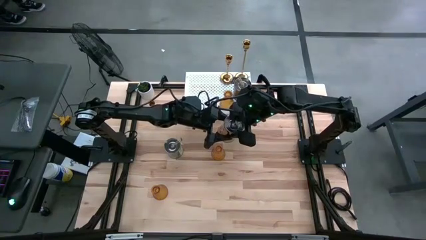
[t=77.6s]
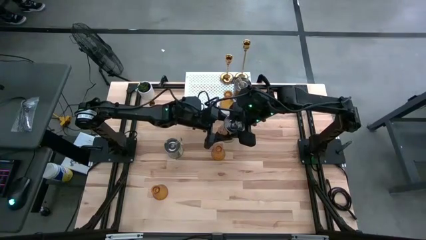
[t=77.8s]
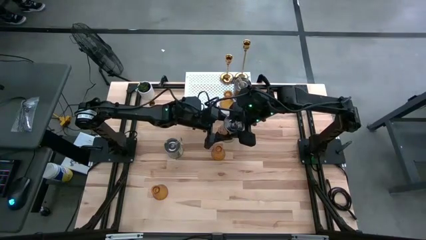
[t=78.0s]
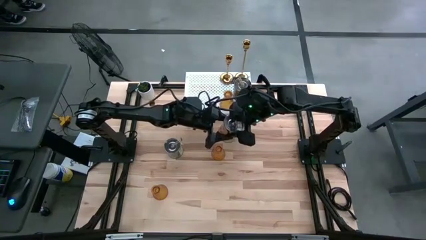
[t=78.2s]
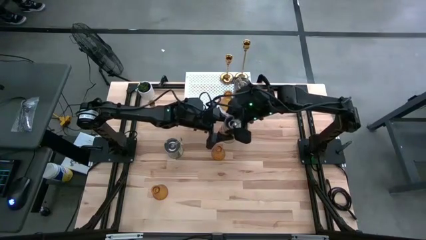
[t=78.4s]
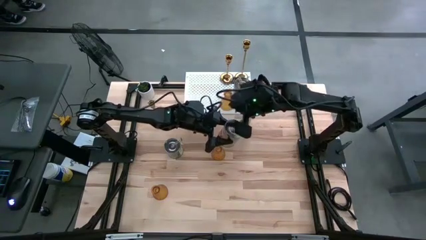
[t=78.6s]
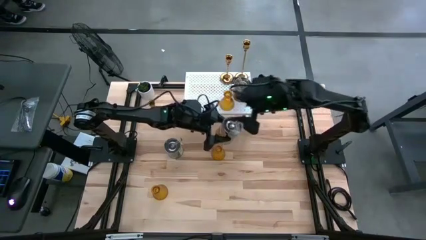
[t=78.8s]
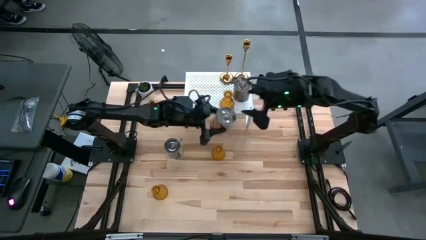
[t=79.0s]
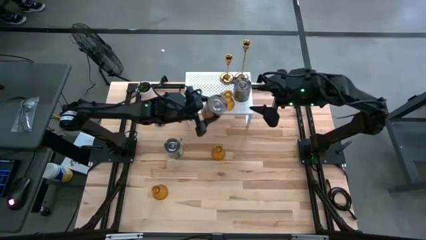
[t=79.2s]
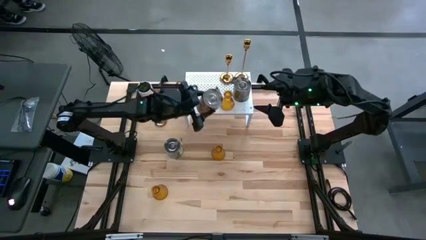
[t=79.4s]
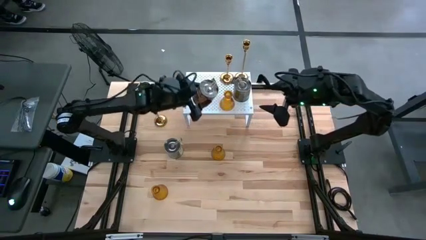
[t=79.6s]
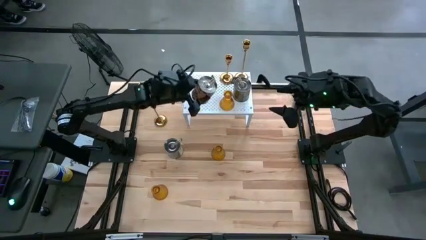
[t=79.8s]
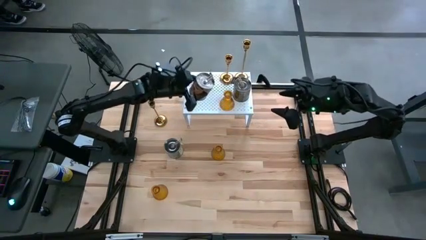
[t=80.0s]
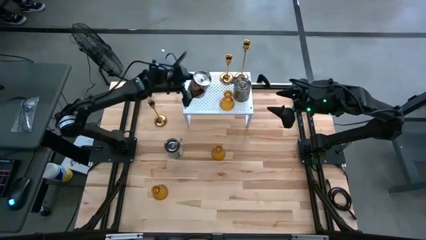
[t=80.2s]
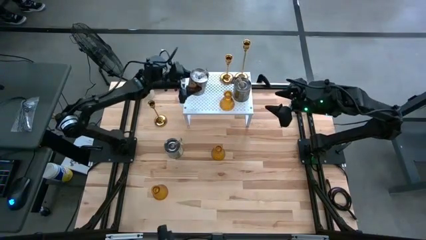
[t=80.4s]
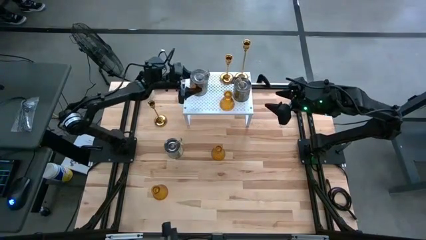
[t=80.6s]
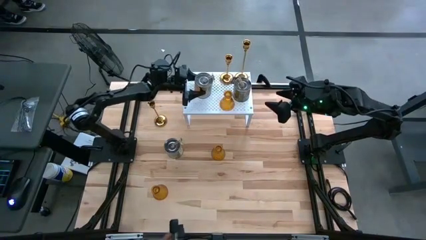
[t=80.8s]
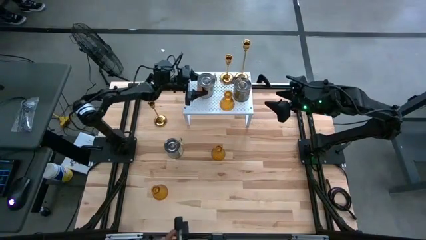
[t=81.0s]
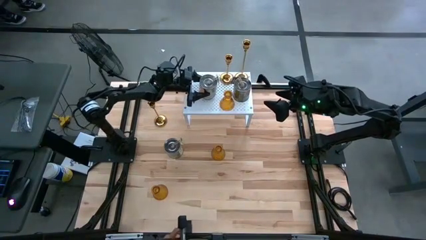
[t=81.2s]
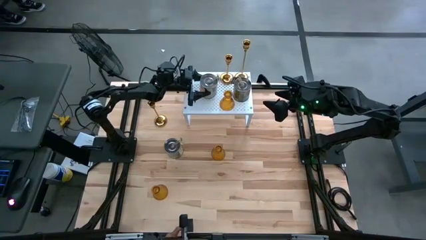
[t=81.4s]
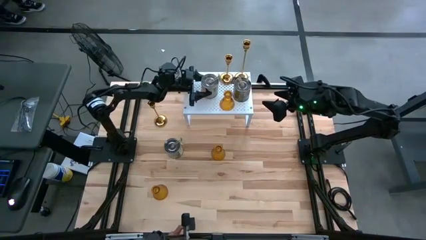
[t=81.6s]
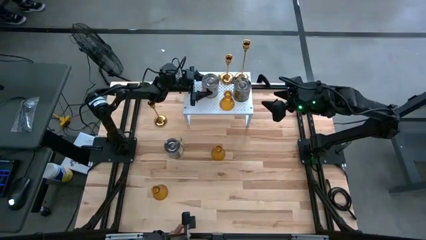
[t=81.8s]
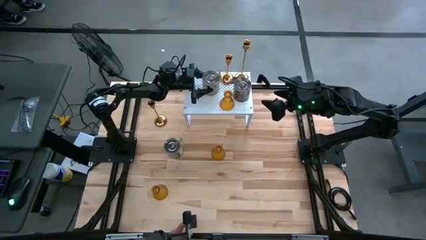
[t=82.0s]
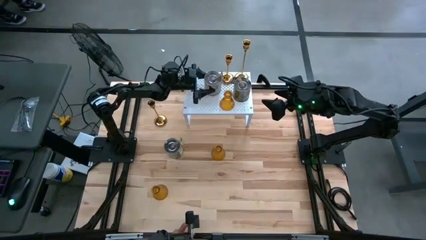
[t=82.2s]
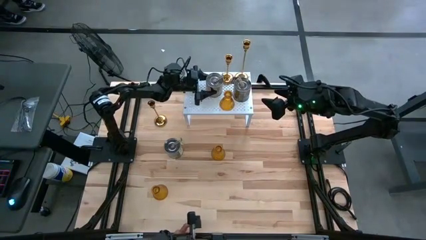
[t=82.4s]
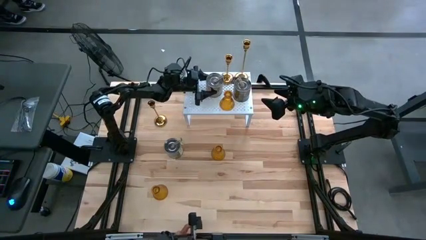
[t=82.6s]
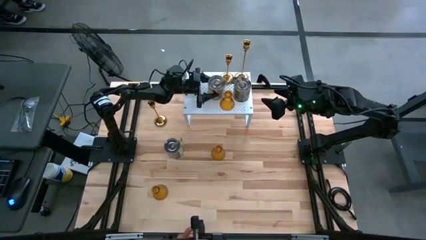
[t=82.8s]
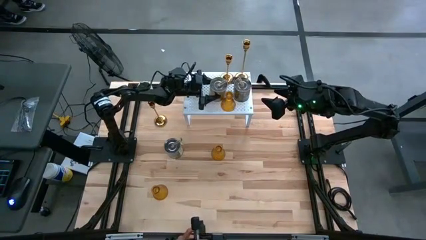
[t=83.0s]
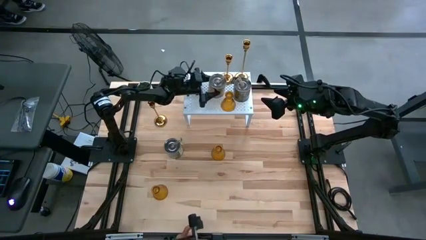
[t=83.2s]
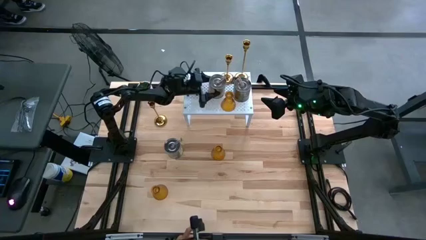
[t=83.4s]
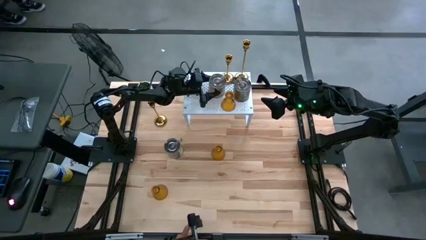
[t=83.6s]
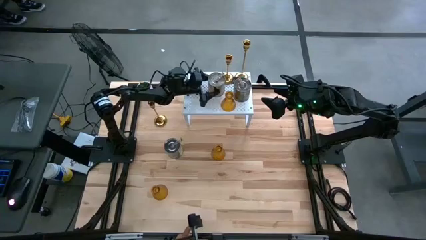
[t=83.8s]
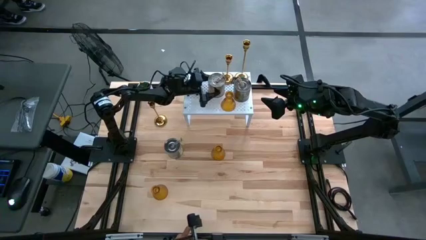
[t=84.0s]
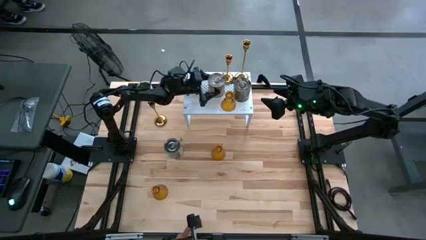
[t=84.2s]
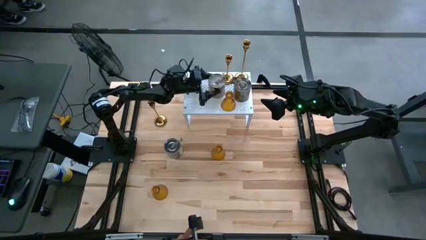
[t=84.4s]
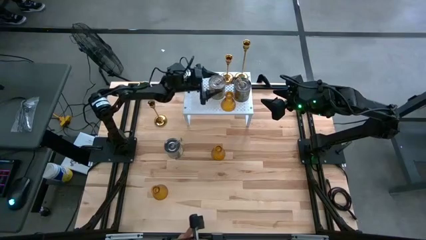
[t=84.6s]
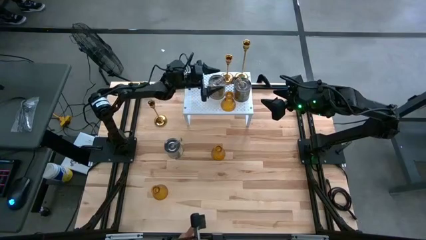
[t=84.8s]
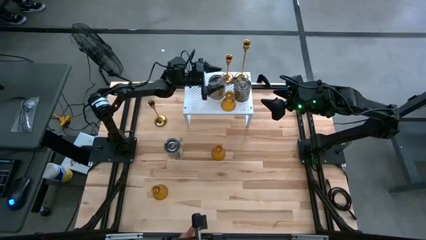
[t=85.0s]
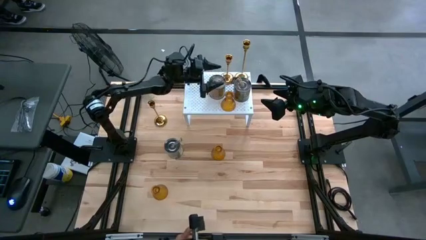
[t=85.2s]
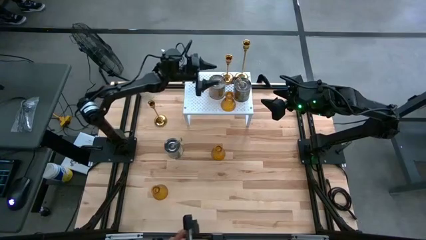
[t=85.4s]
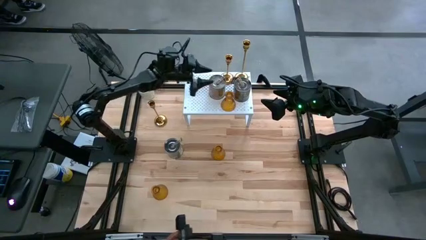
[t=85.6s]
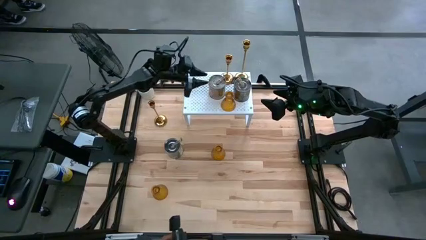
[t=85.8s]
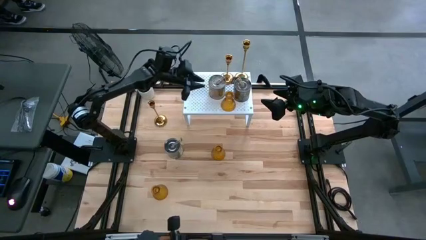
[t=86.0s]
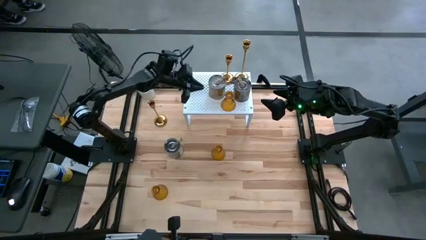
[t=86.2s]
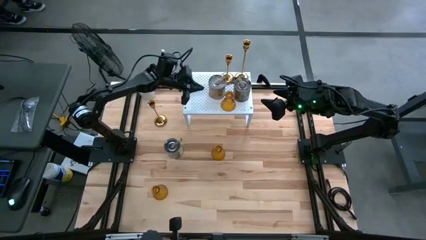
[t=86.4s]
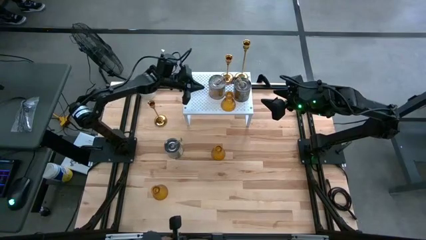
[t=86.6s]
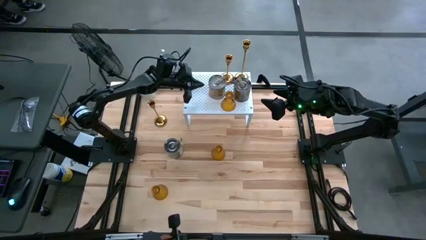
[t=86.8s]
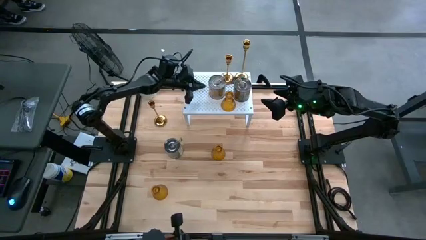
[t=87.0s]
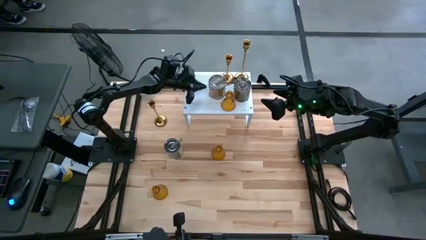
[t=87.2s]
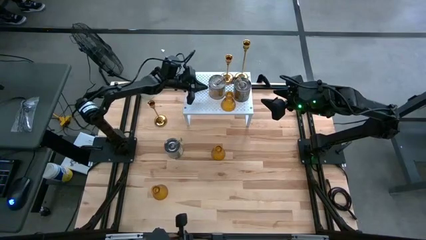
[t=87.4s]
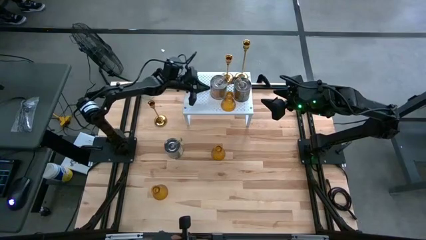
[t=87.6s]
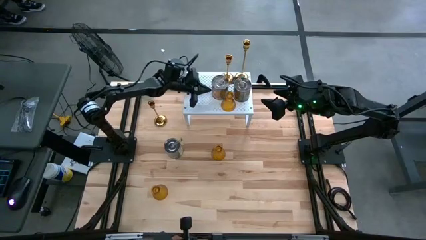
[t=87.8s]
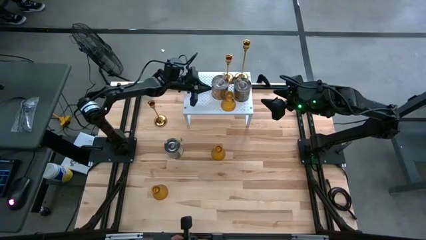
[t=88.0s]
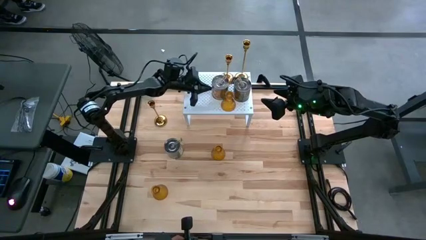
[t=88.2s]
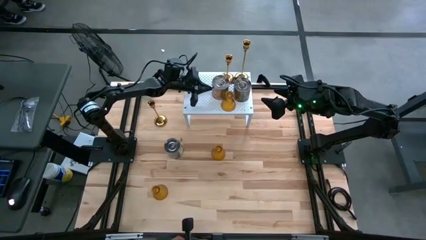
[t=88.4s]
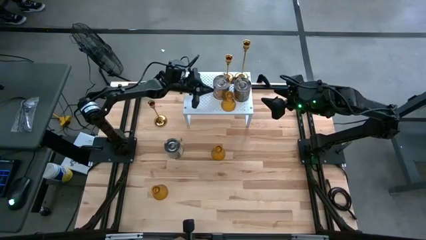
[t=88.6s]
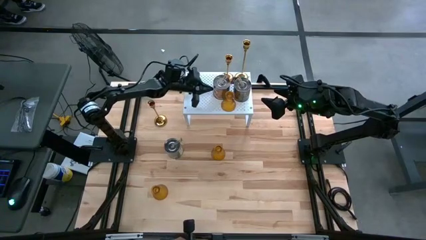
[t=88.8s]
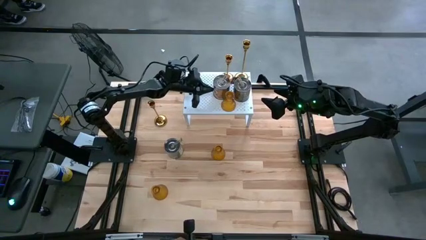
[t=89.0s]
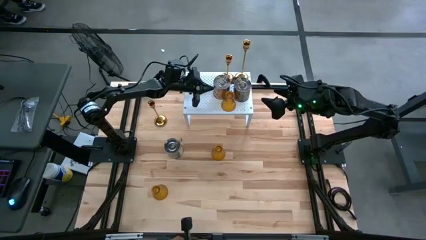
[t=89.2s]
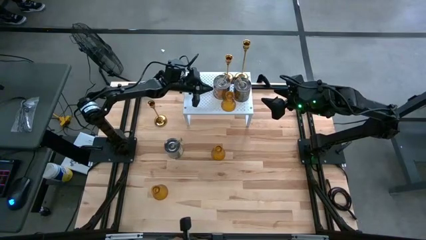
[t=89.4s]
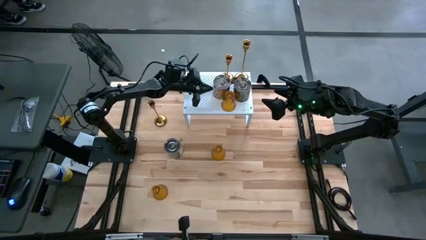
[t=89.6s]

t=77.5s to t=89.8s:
Task: Pick & Place candle stick holders
Put the orange and silver scented candle on the shelf

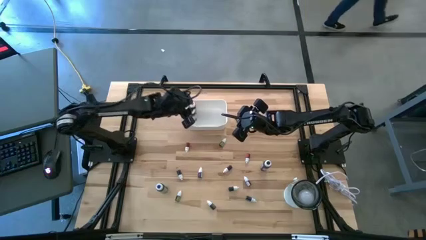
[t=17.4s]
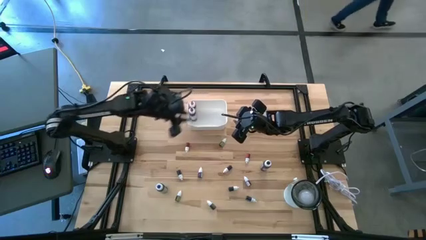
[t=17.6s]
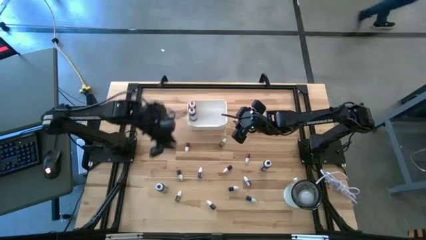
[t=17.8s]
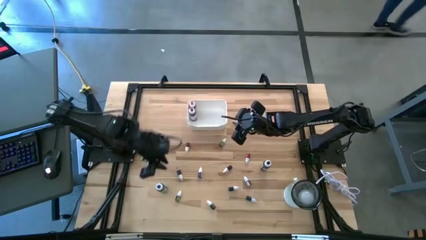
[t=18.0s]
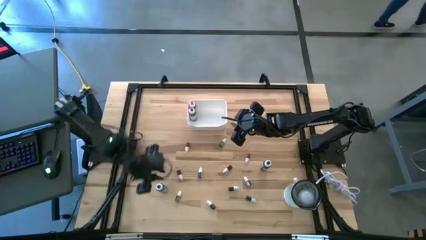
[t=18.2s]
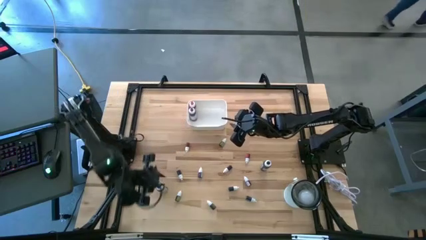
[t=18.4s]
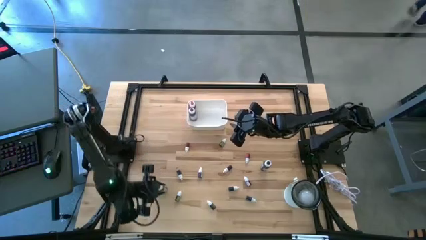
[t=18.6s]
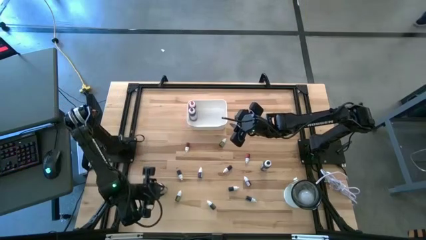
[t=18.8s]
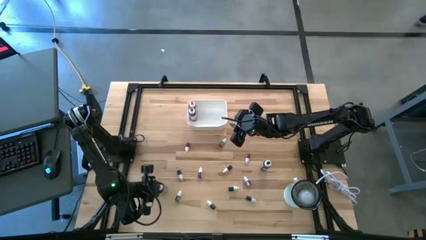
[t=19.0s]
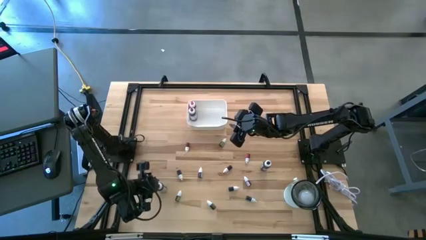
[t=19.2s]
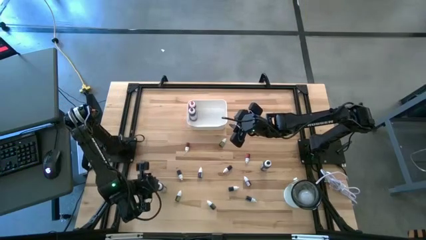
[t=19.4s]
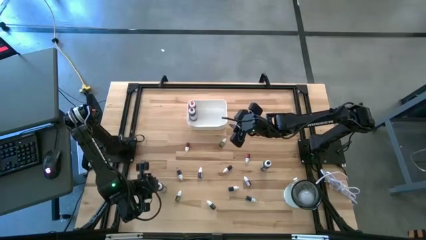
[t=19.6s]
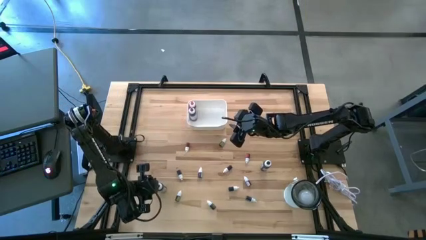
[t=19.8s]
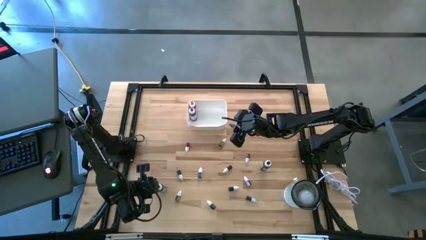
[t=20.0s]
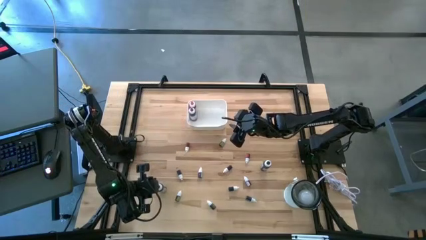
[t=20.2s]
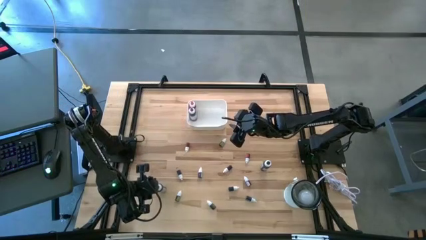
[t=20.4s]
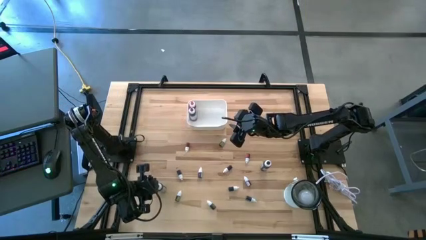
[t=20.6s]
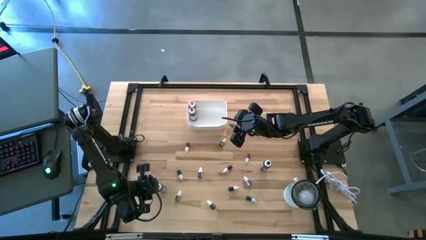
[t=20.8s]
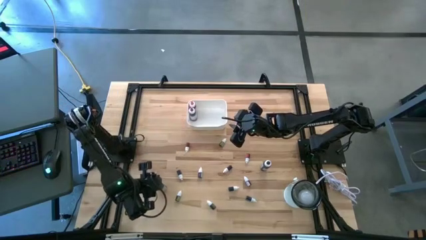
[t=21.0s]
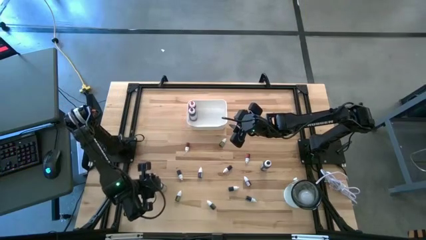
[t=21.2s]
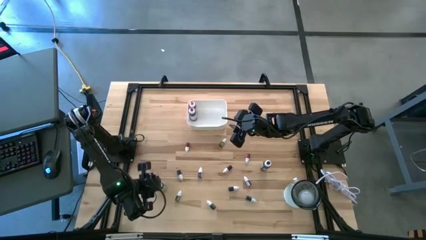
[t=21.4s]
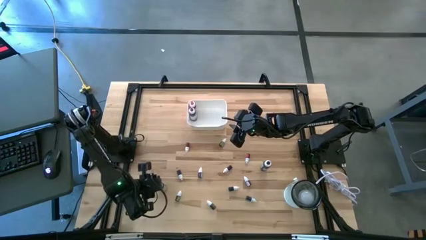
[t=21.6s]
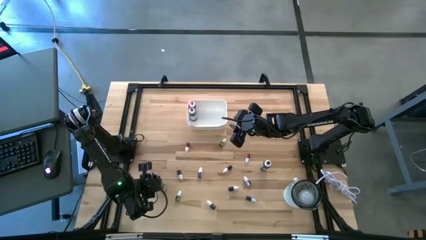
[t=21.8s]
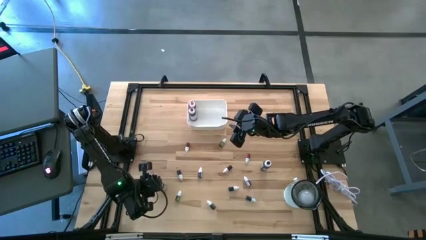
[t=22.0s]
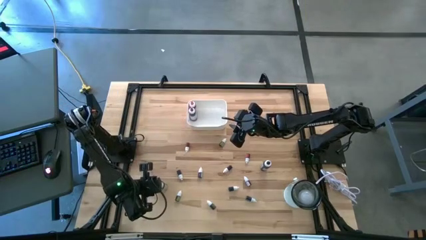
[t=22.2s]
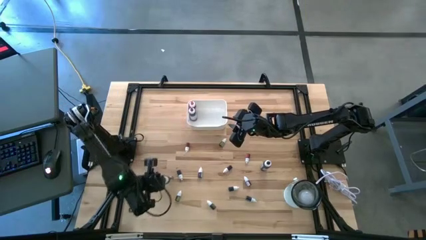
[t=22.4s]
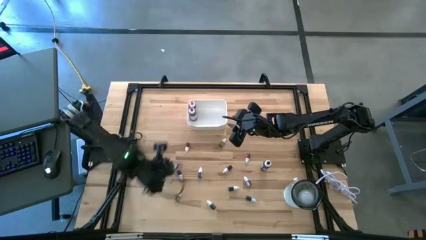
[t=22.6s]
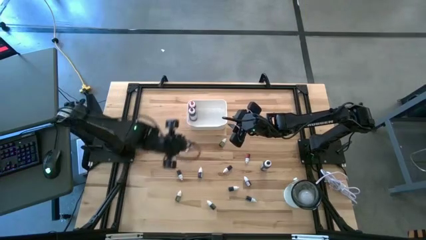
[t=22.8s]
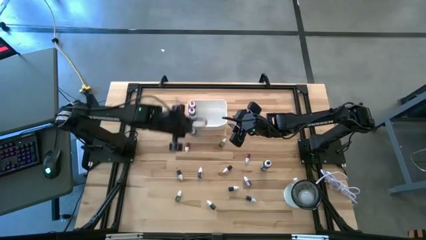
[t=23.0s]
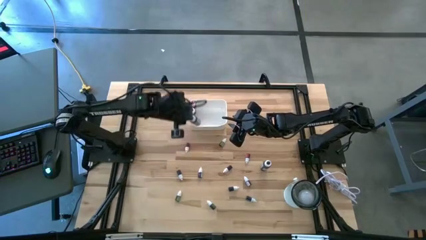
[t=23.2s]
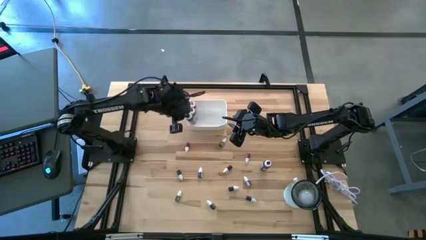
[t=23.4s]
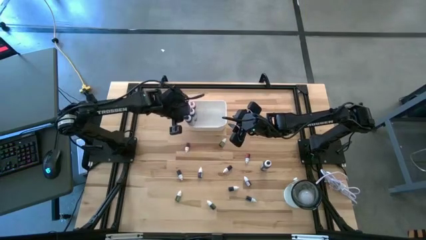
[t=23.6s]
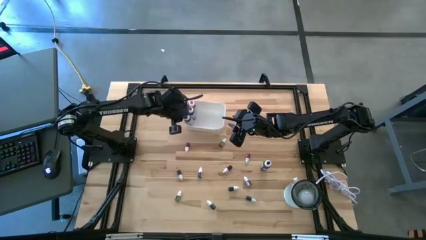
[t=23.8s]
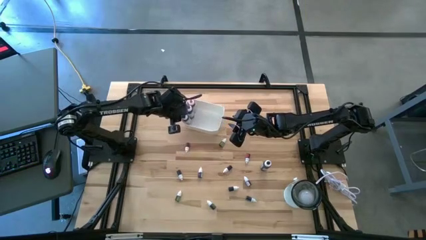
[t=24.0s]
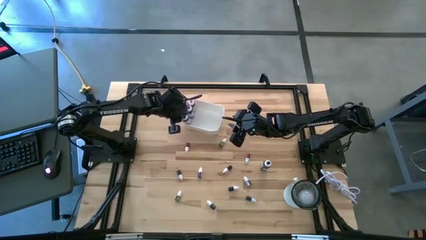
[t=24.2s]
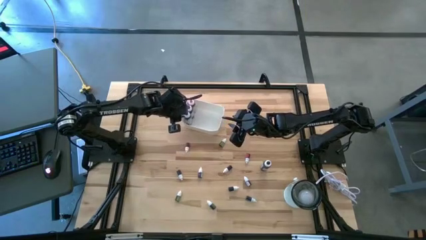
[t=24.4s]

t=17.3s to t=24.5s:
Task: Pick & Place food coloring
Put the large blue food coloring bottle into the white bin
